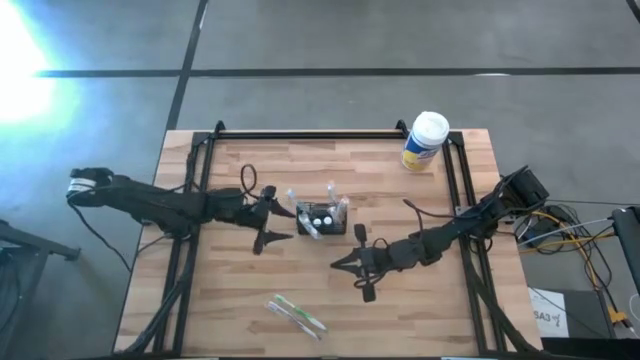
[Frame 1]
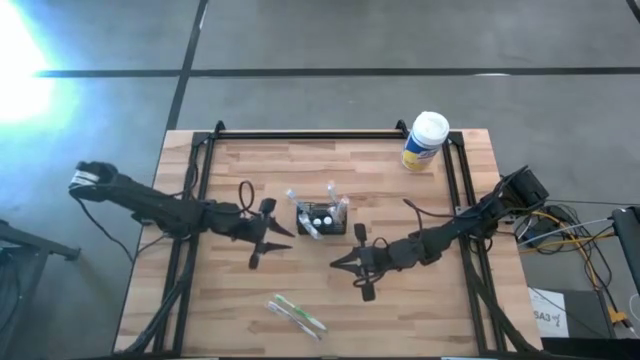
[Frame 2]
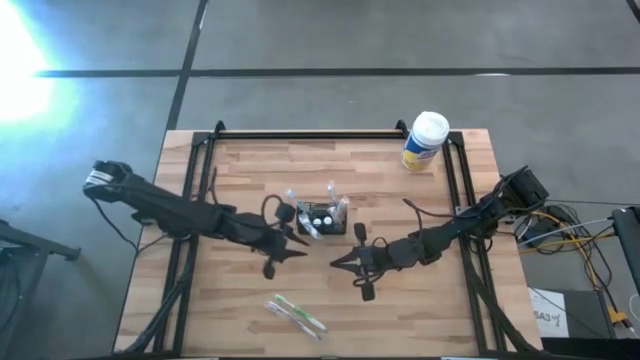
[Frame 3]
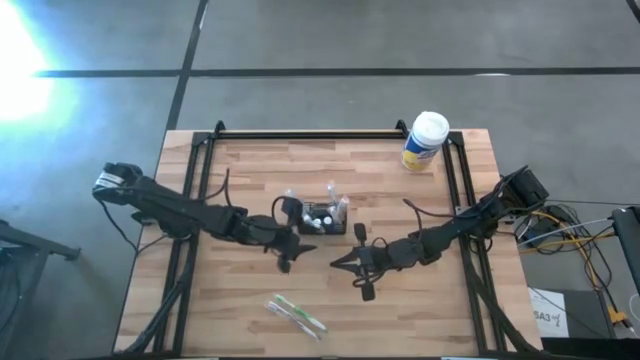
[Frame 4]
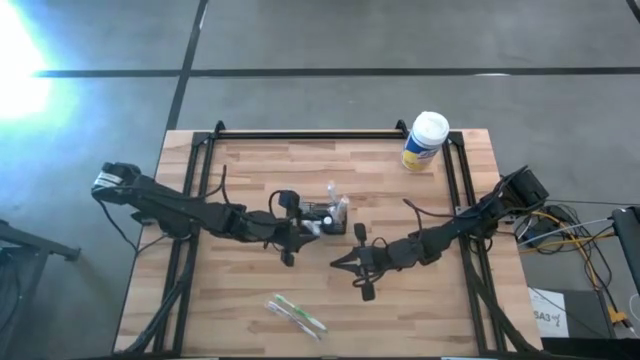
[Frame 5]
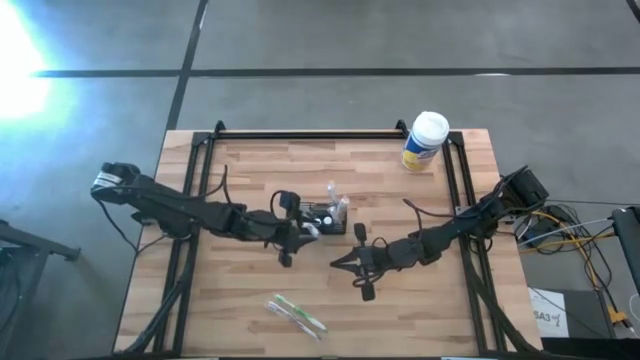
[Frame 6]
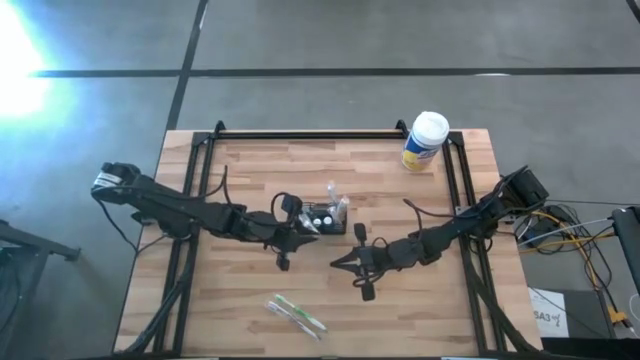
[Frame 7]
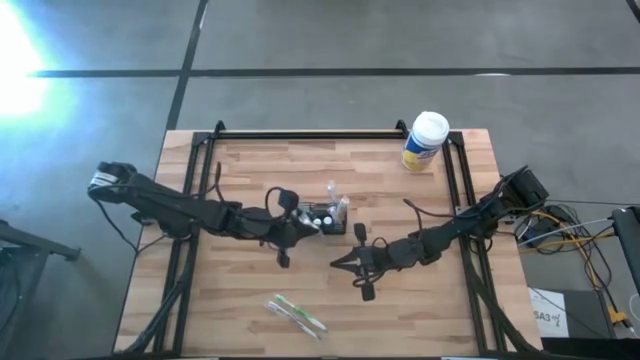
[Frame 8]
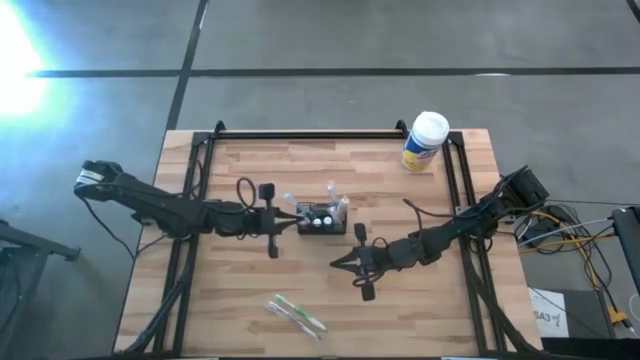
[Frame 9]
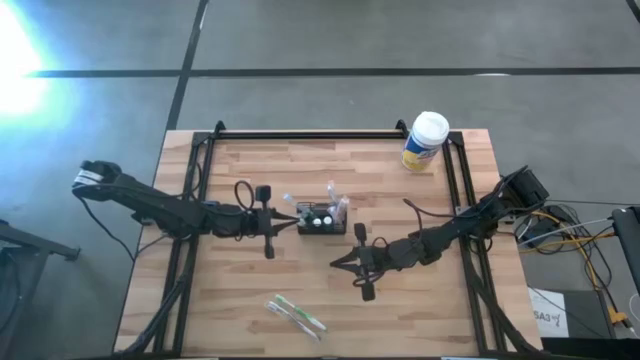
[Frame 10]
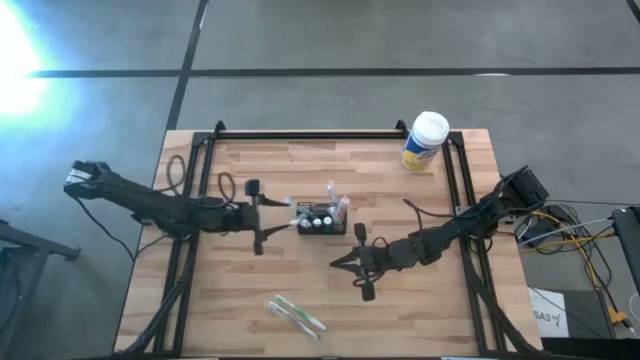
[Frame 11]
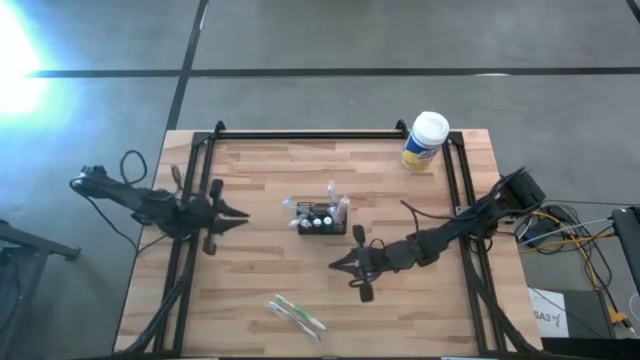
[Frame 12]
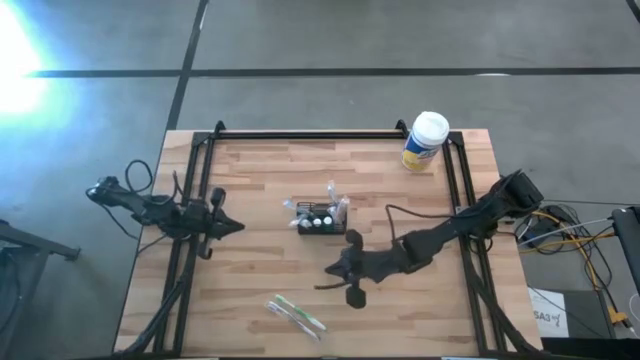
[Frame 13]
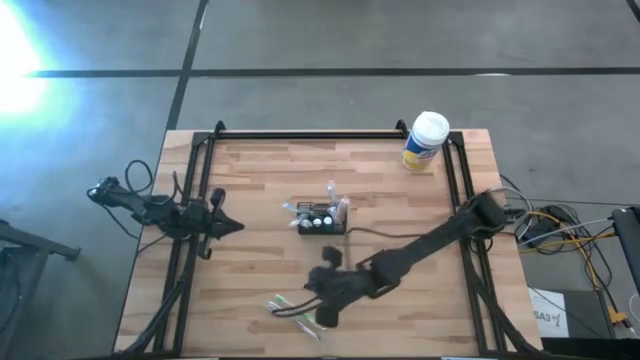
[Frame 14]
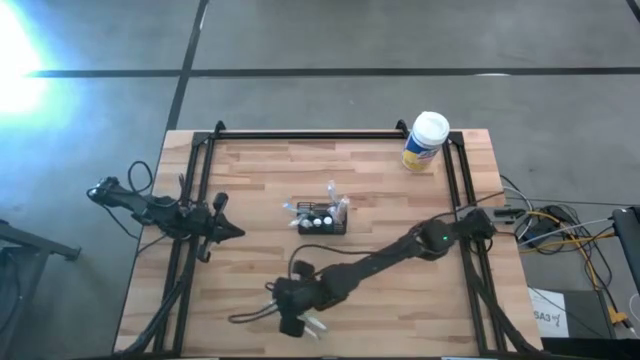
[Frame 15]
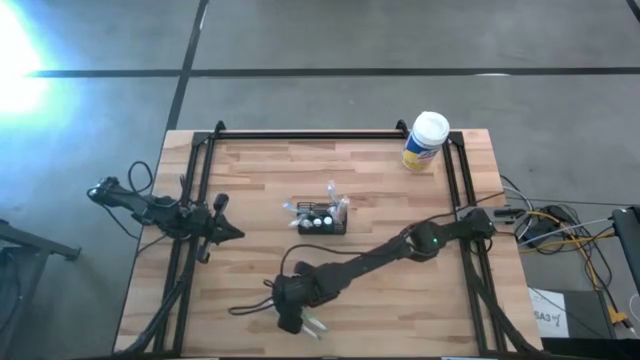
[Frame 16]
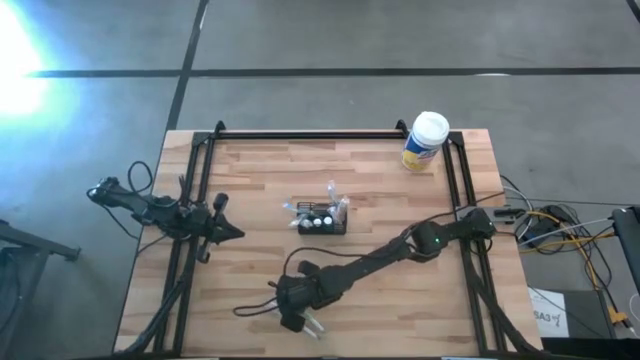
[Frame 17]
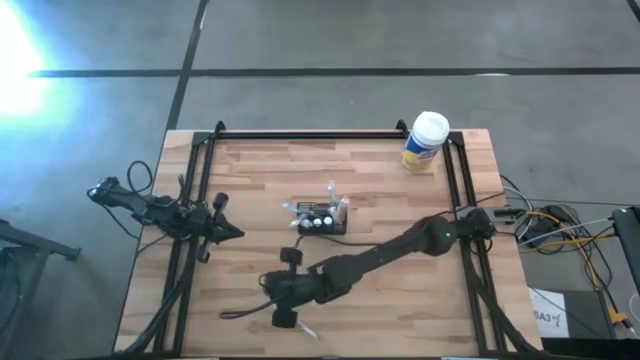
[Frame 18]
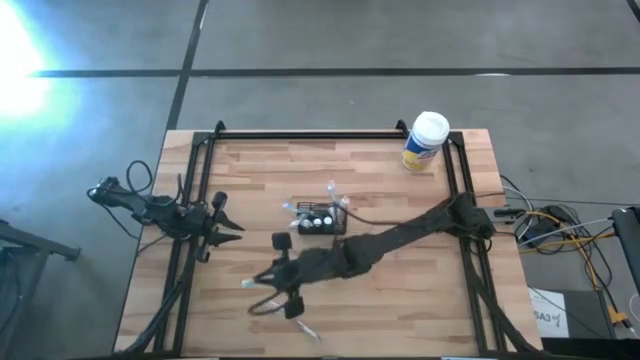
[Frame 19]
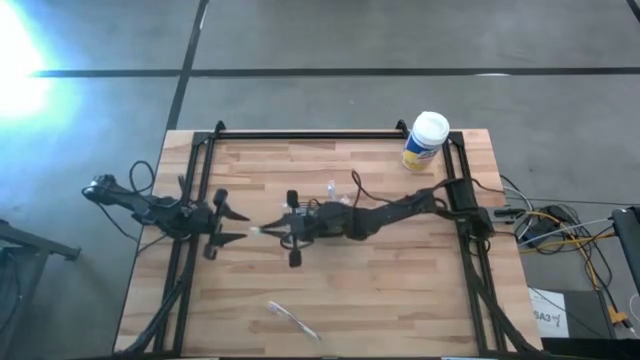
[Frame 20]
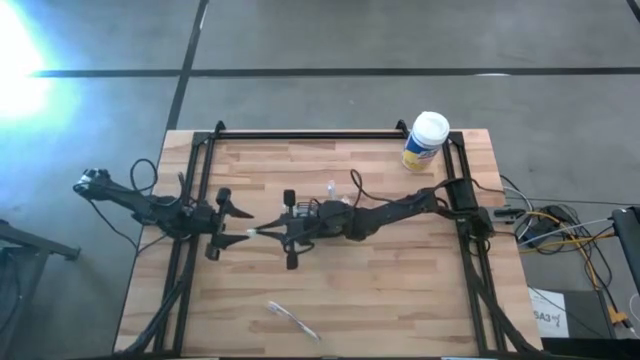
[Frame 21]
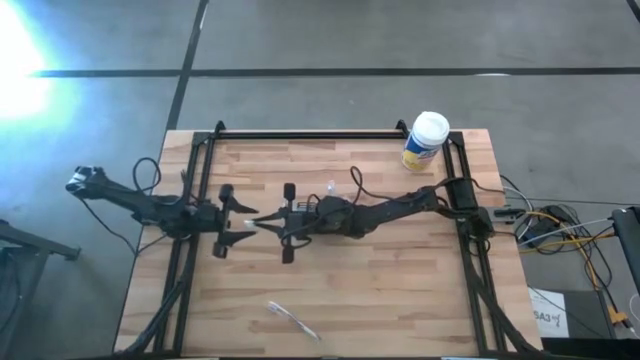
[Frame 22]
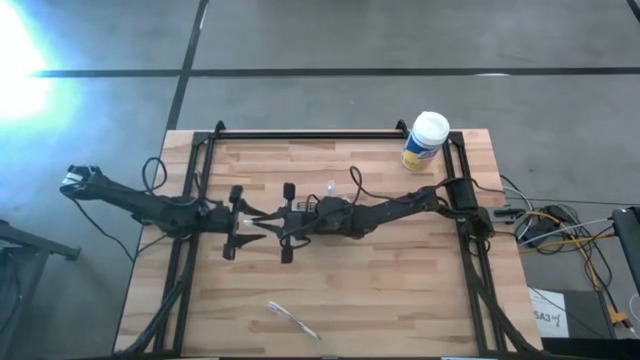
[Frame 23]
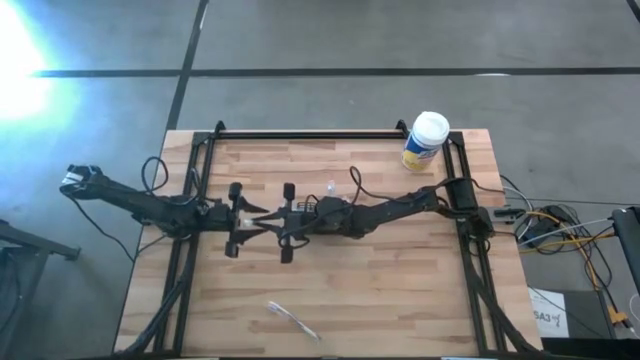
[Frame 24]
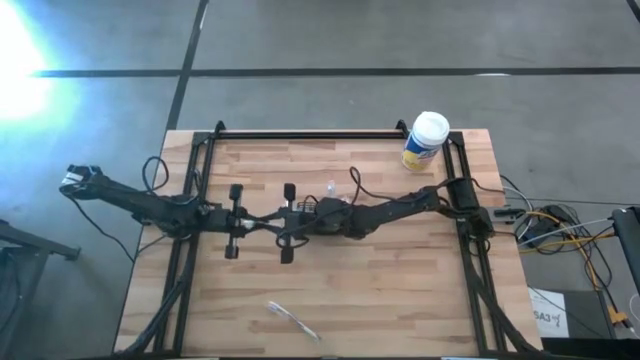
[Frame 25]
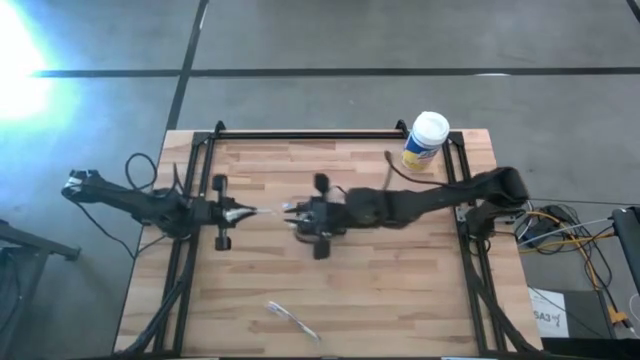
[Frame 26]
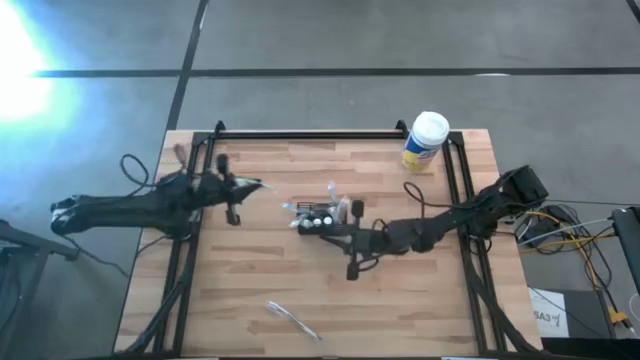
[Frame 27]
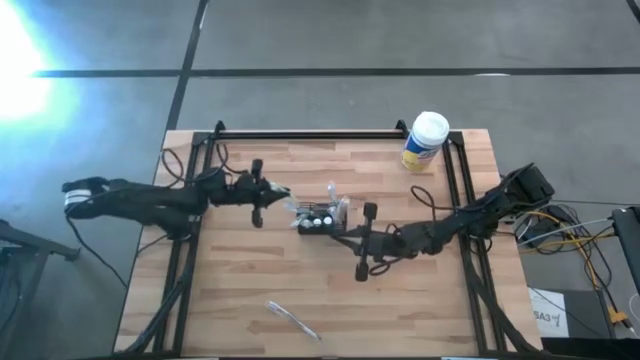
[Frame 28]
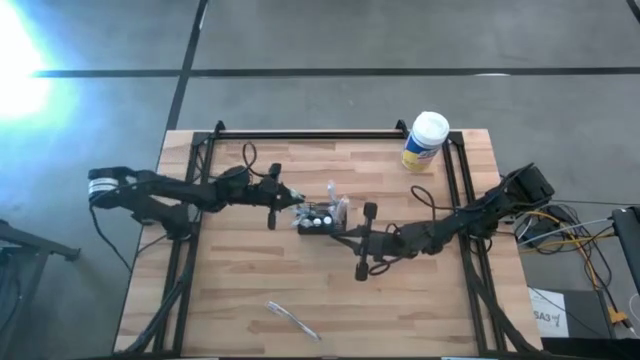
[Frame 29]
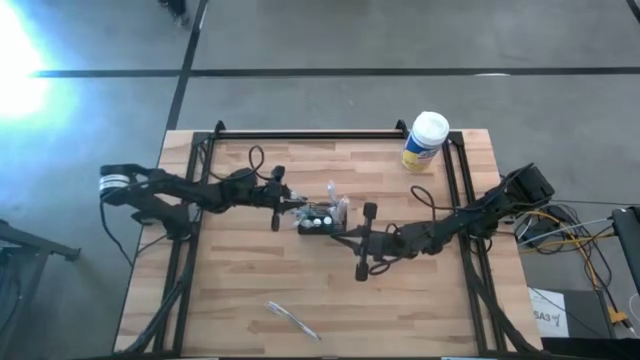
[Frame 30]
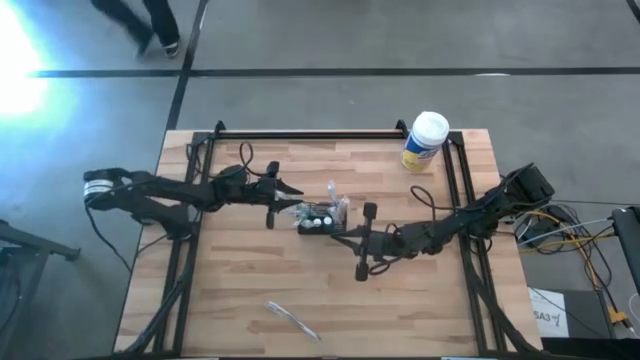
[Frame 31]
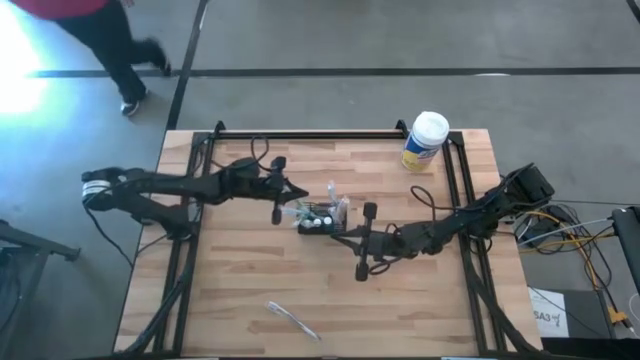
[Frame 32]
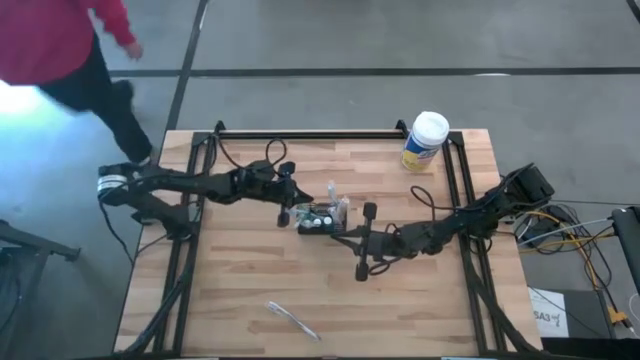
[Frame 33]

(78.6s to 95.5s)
Task: Pick & Place toothbrushing station
Put the green toothbrush into the black mesh organizer

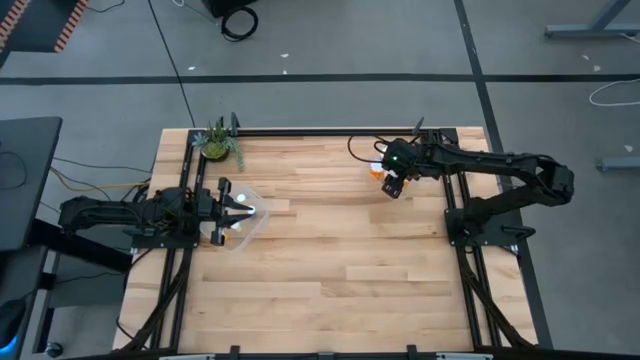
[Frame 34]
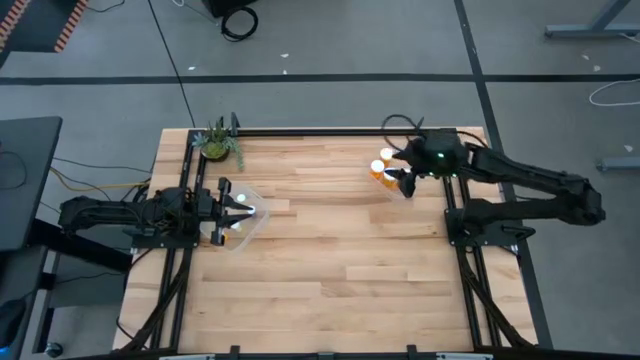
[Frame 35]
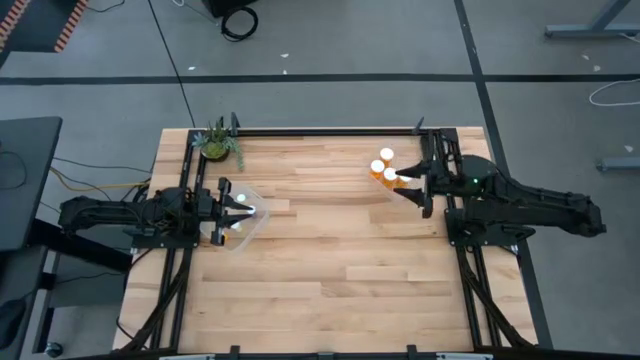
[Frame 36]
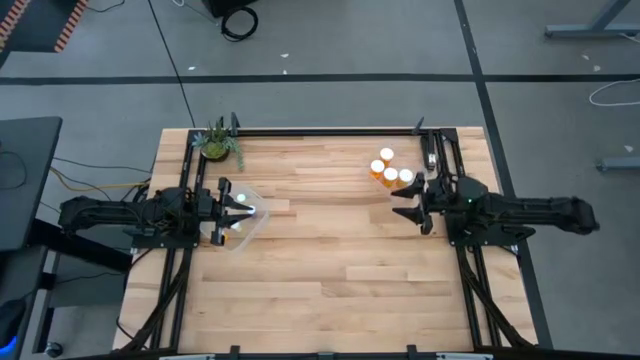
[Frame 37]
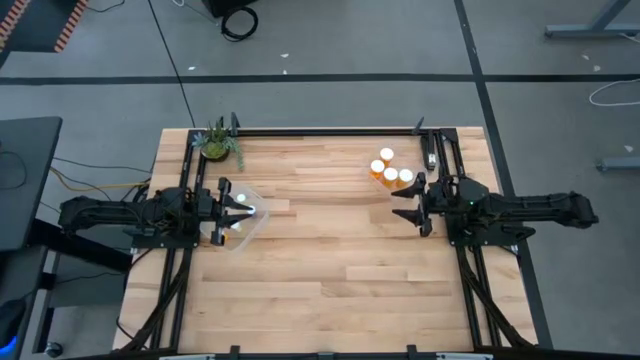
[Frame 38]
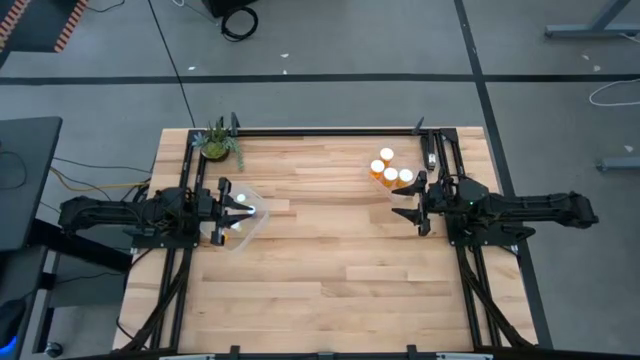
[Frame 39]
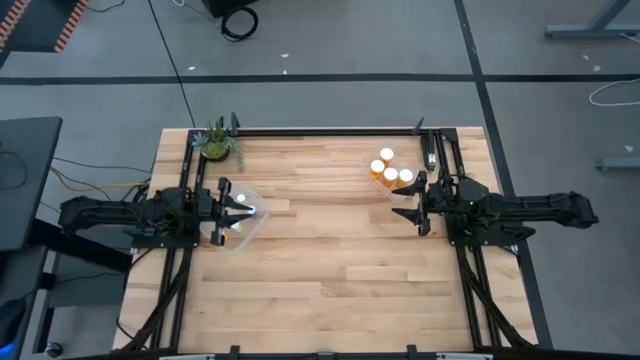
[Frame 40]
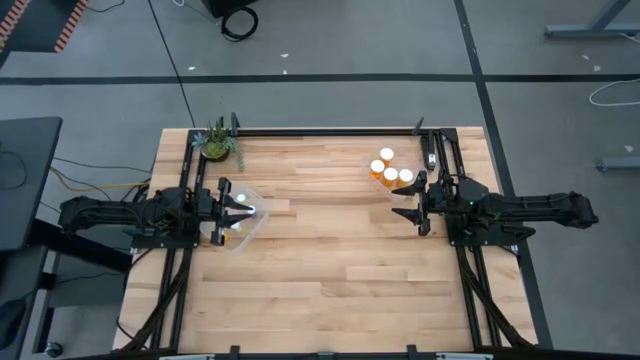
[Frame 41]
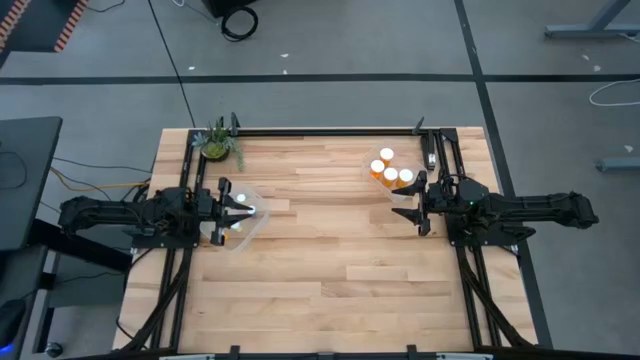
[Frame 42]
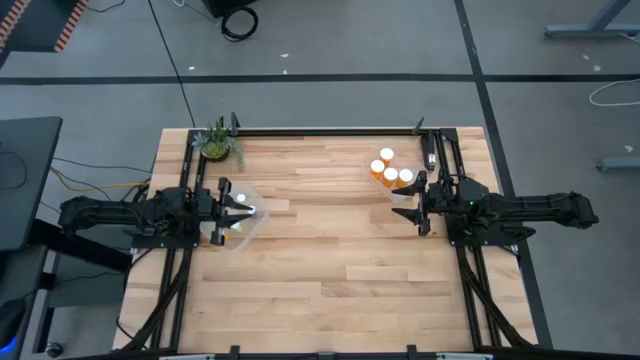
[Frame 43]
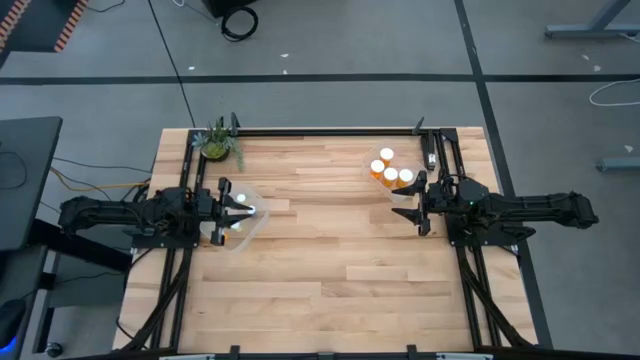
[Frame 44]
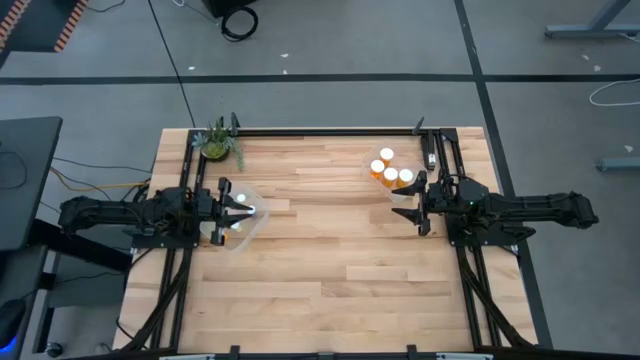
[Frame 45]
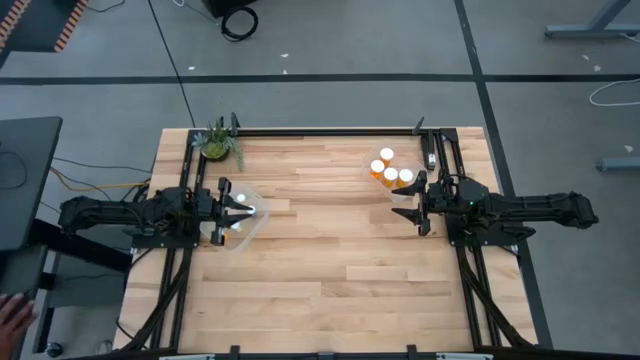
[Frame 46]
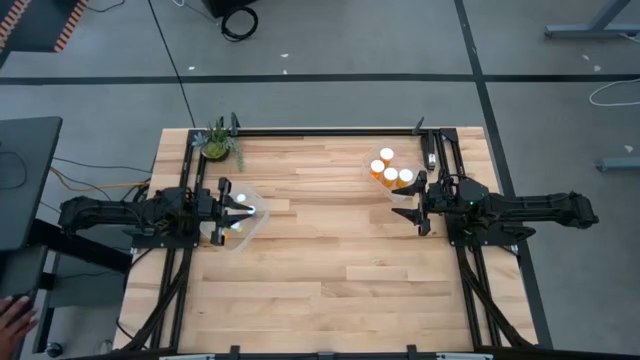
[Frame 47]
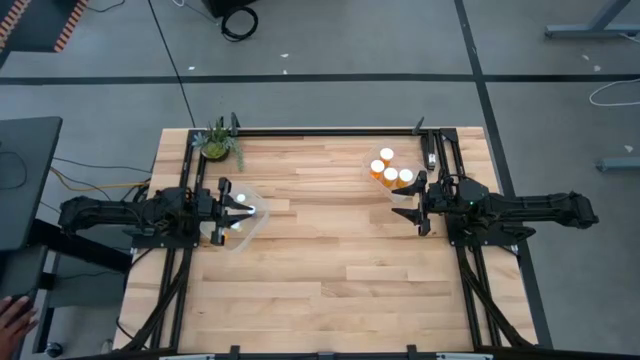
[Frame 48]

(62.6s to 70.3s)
Task: Pick and place medicine bottles into bin by pill shape (circle, oval)
Return to Home Position
